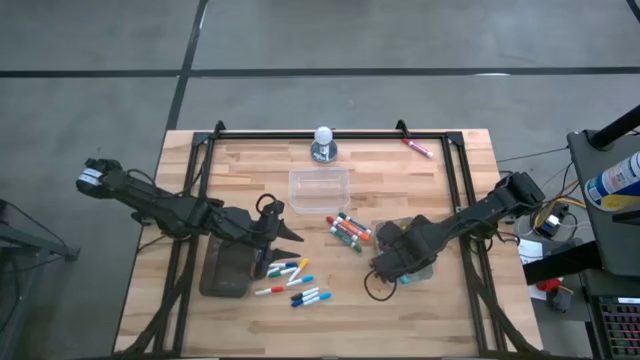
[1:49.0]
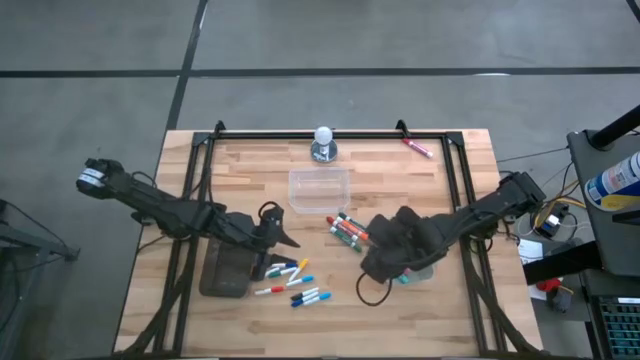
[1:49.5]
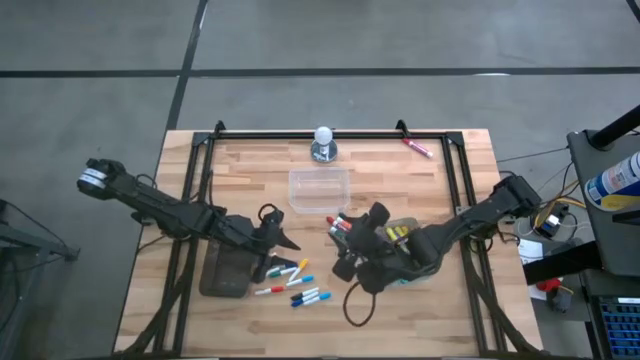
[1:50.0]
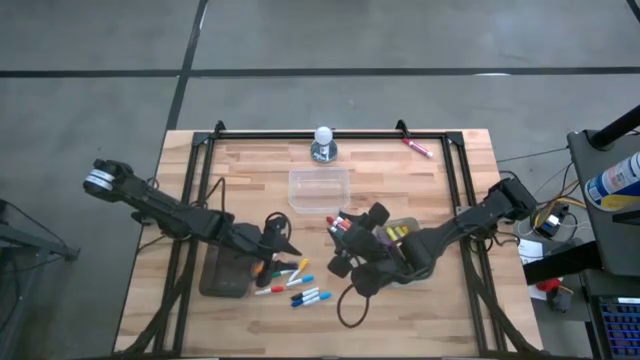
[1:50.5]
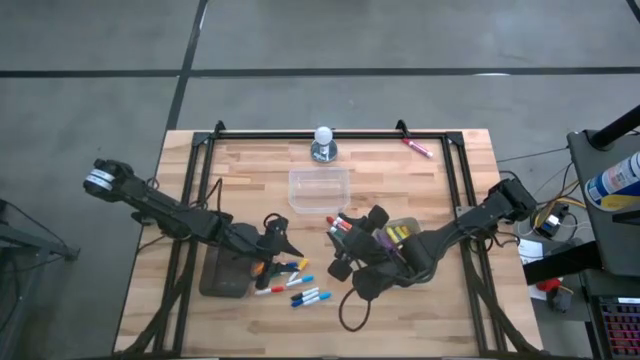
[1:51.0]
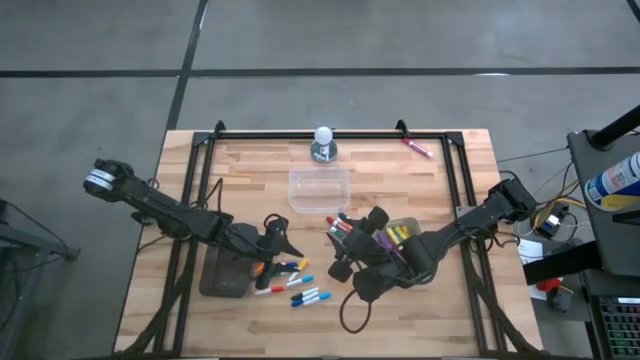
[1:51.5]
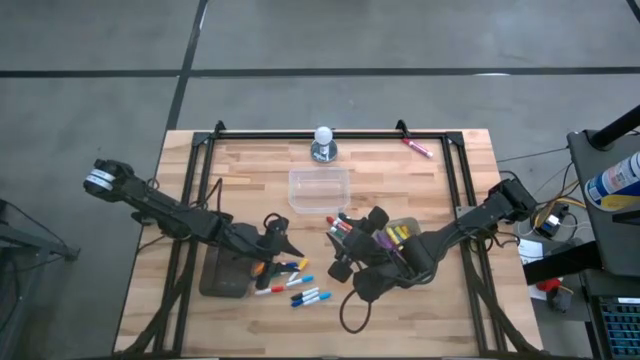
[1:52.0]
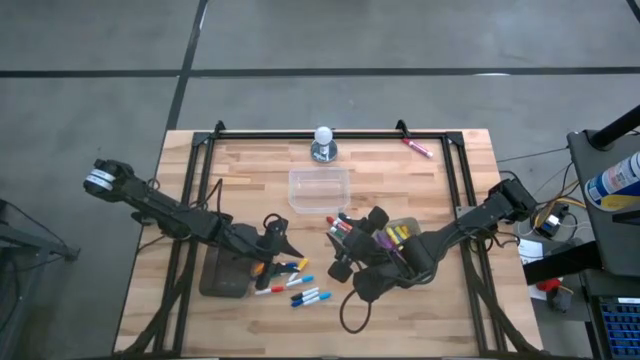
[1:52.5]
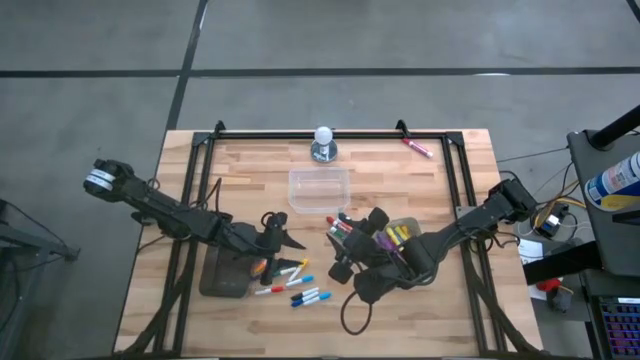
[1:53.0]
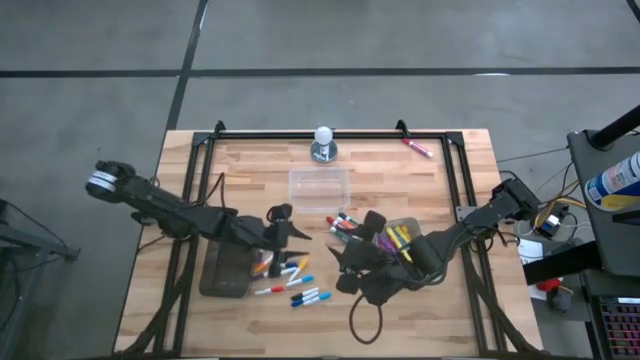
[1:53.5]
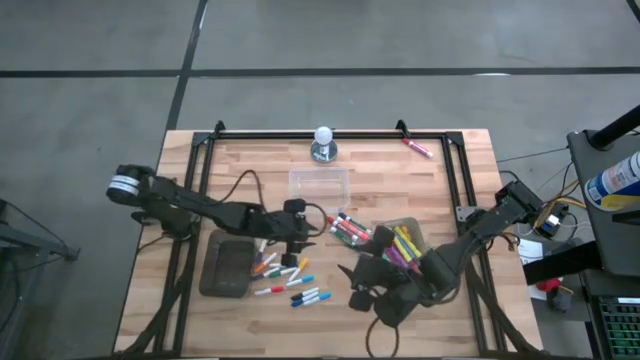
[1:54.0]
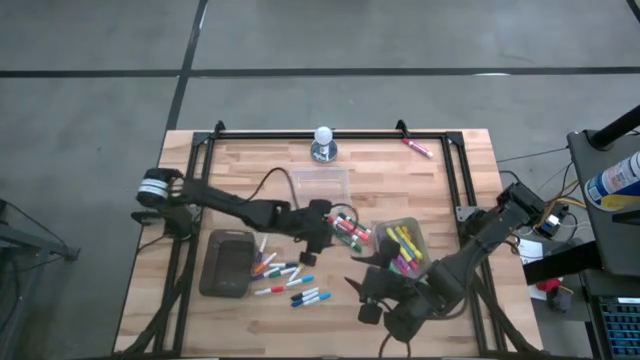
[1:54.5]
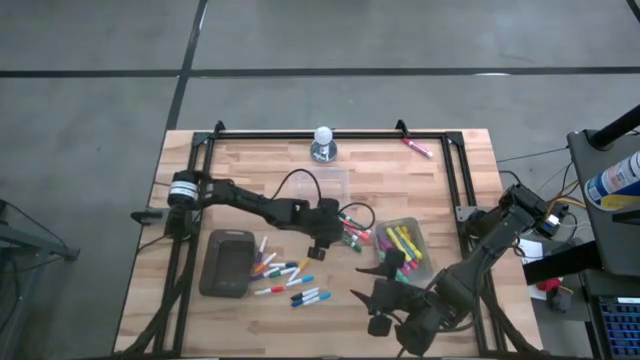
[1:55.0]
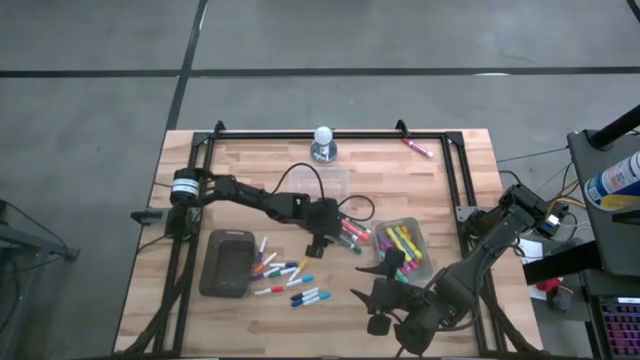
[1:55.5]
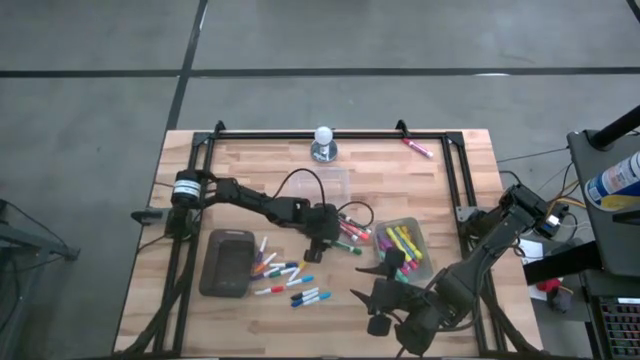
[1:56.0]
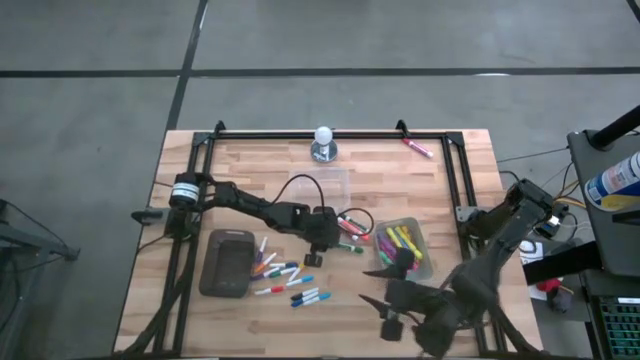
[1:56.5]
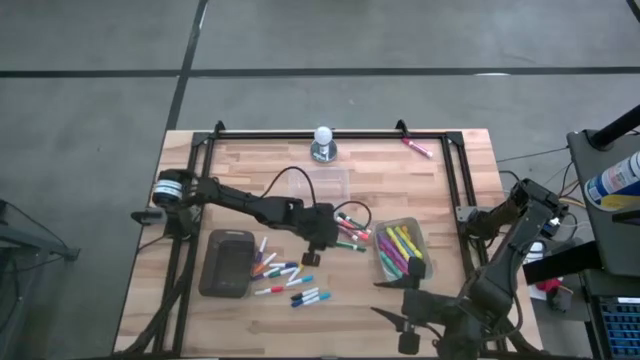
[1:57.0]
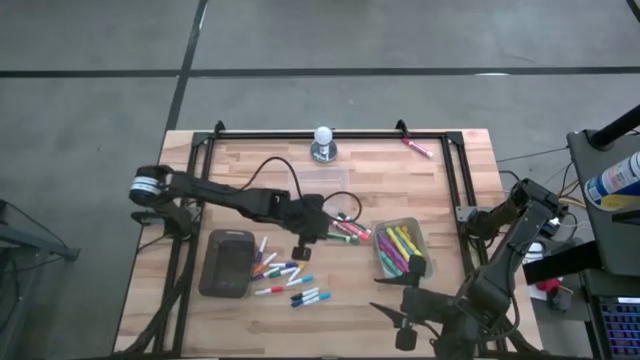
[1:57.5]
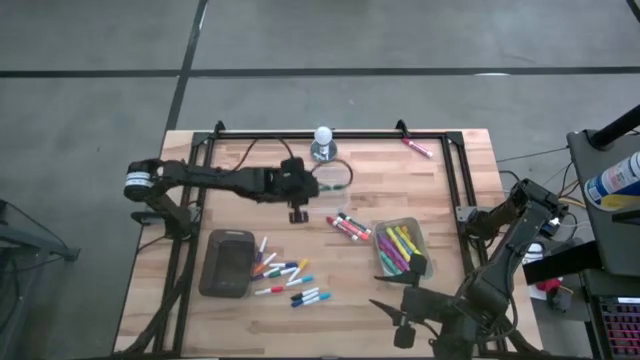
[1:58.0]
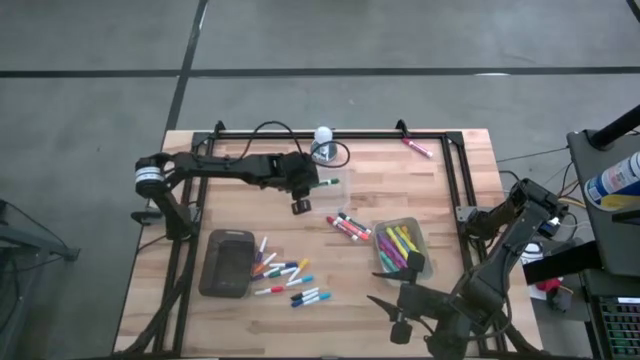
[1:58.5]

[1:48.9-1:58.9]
Task: Pick & Place Markers
Put the light green dry erase marker into the transparent bin

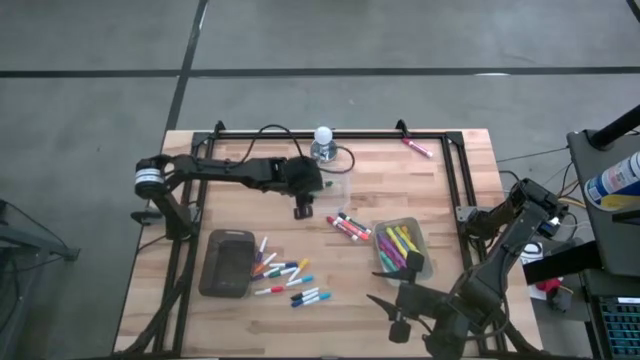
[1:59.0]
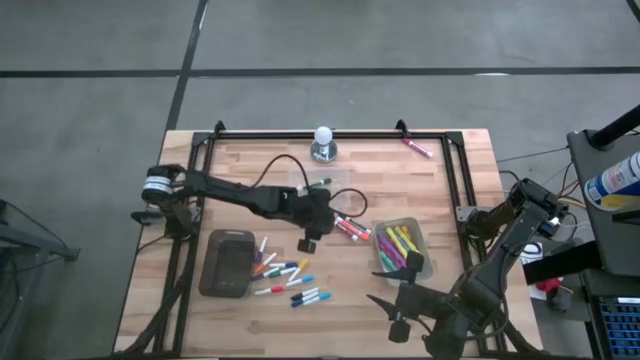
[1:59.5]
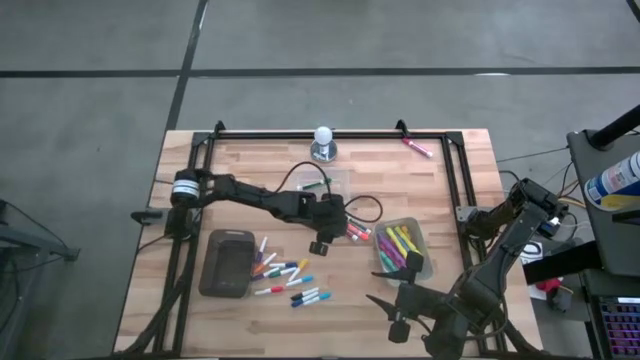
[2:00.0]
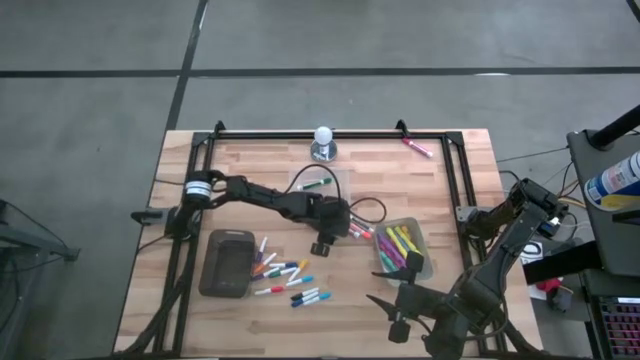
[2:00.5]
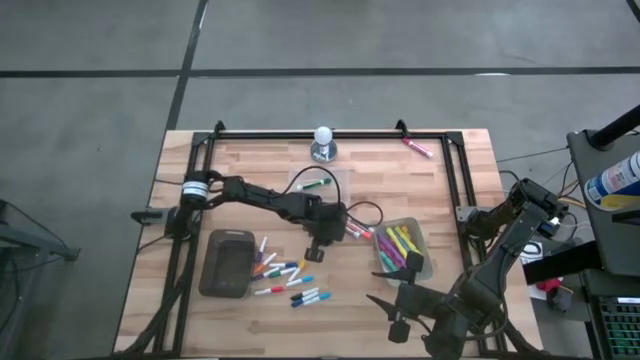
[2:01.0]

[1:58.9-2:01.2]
Put the red dry erase marker into the transparent bin

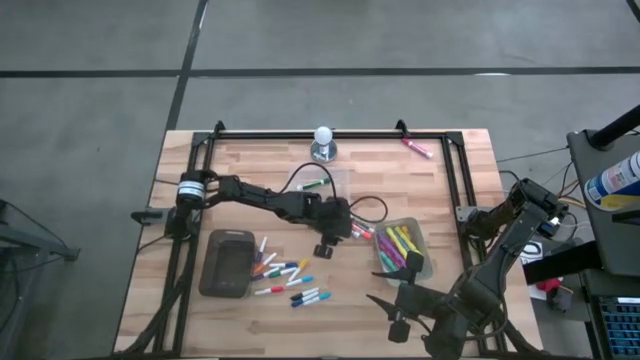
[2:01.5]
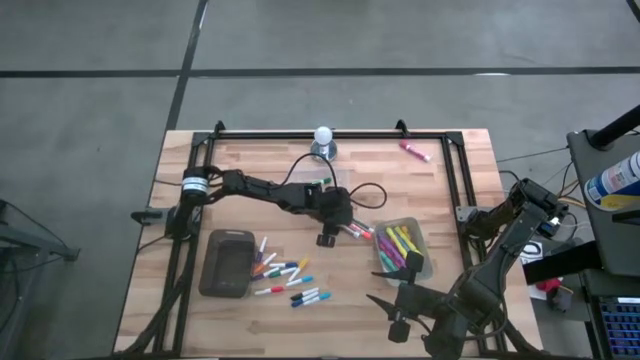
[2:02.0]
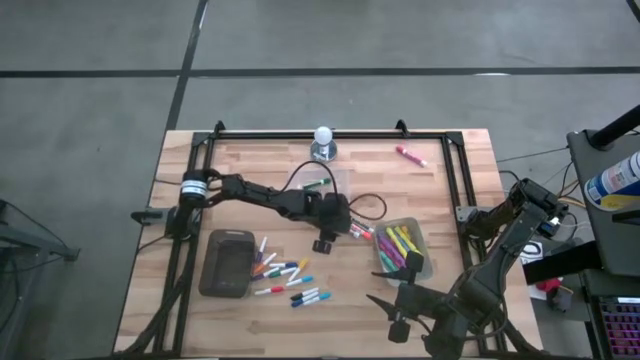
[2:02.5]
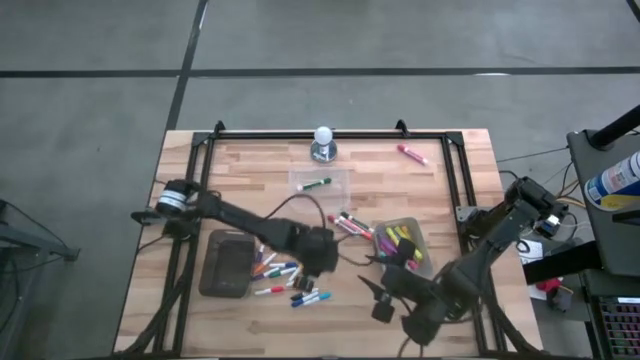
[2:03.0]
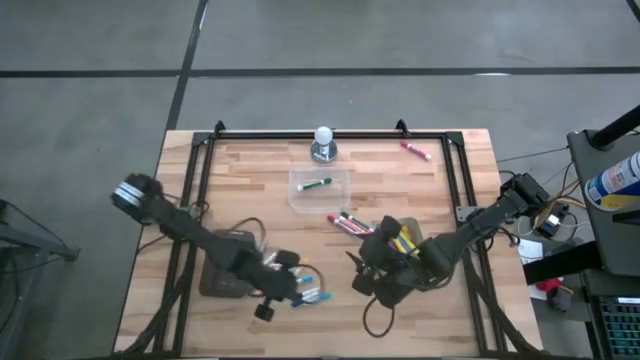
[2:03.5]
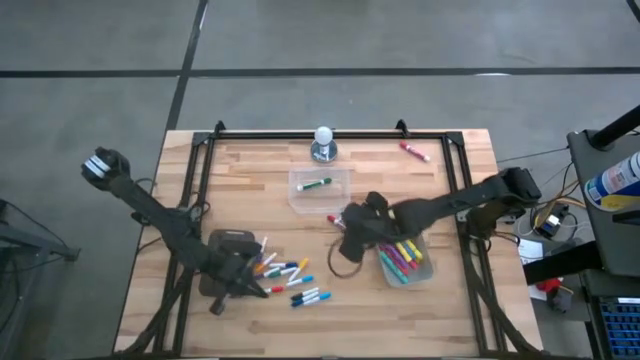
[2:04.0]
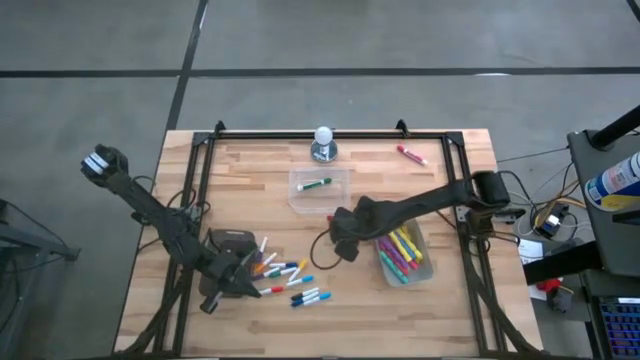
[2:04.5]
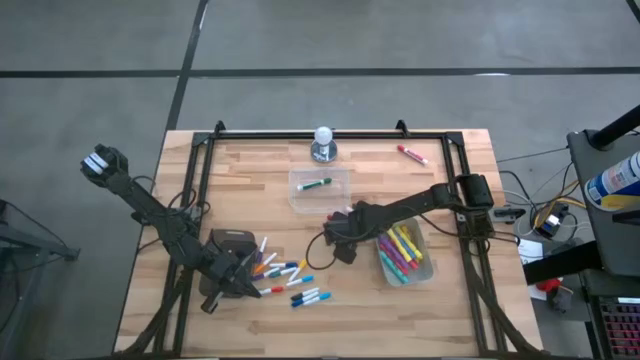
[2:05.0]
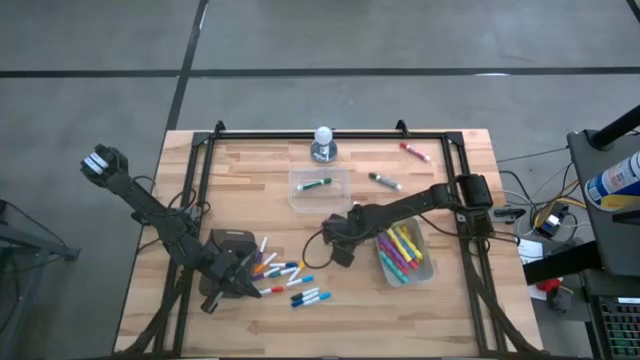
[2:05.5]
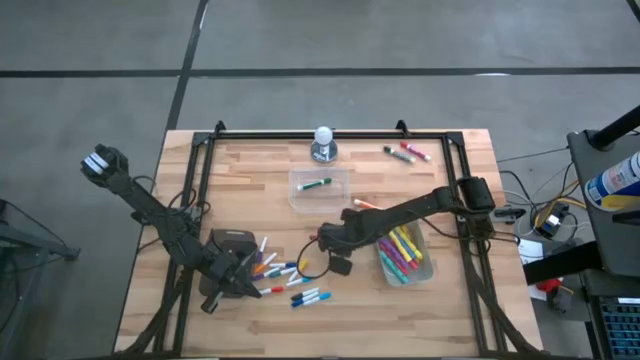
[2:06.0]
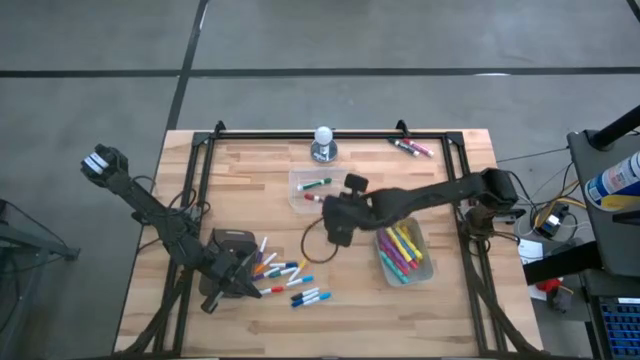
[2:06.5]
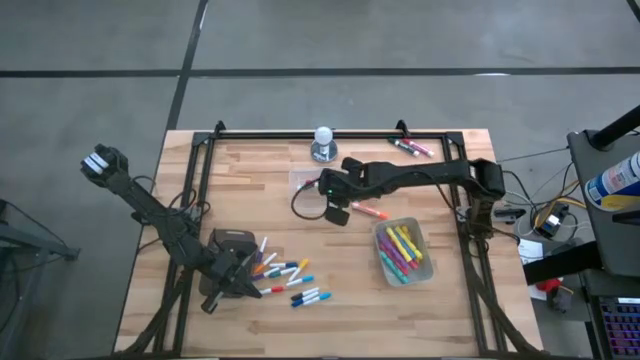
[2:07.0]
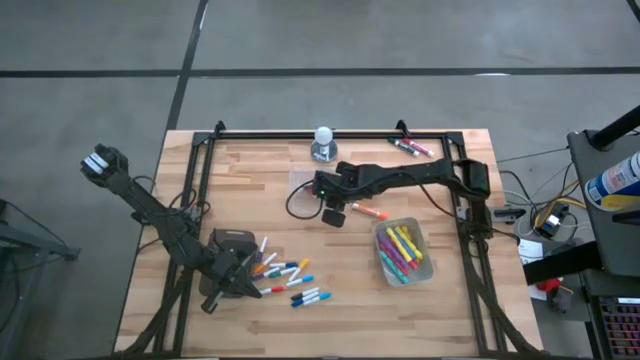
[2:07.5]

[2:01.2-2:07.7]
Put the red dry erase marker into the transparent bin

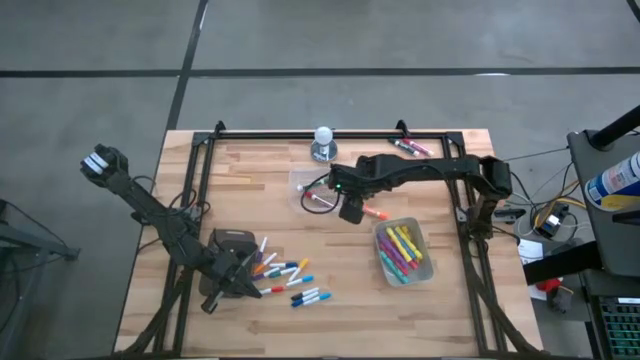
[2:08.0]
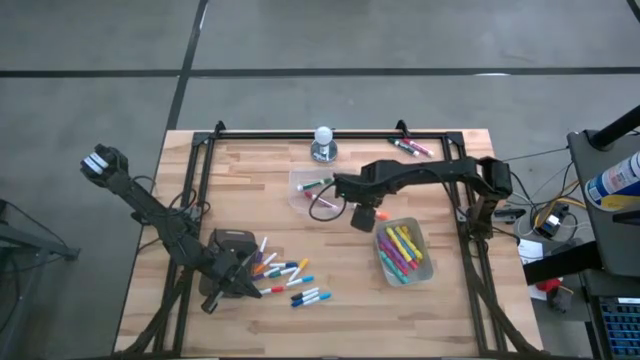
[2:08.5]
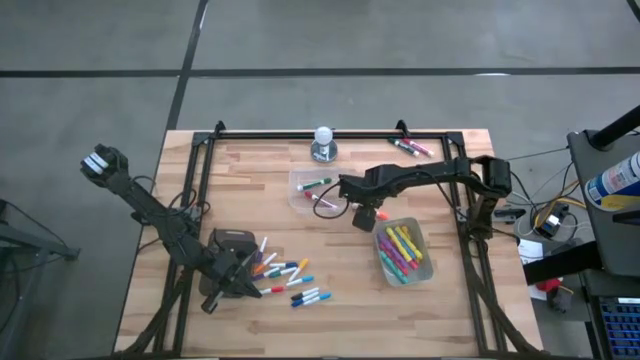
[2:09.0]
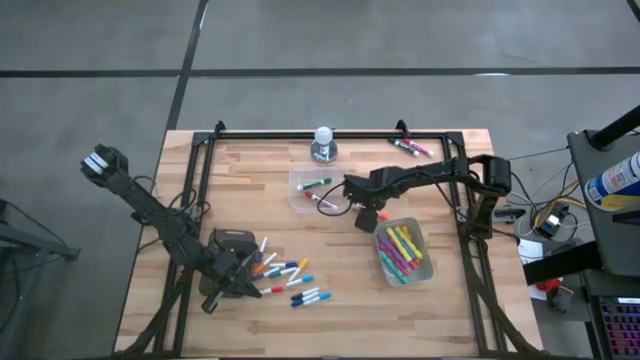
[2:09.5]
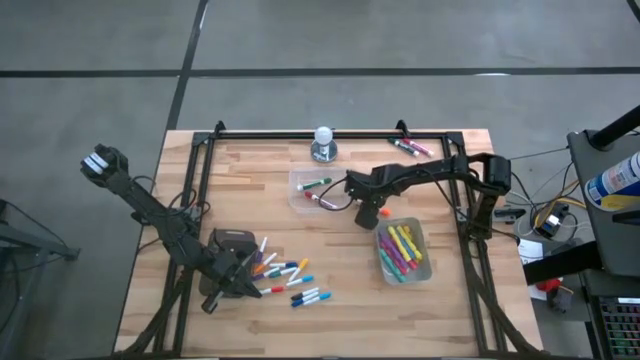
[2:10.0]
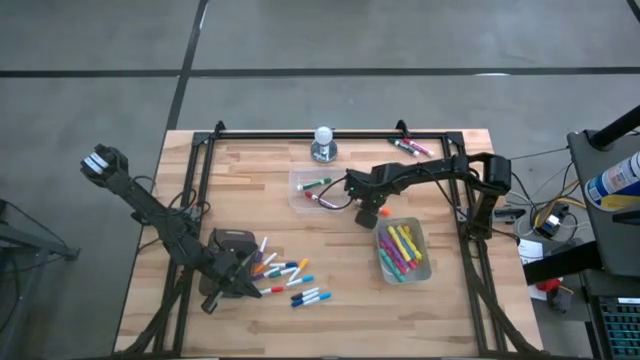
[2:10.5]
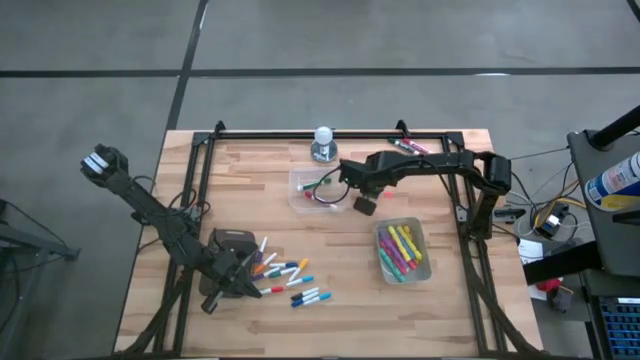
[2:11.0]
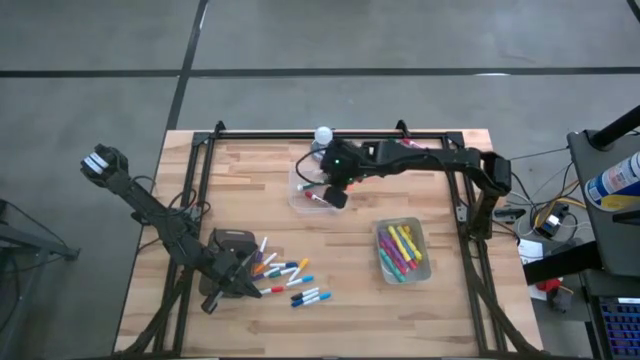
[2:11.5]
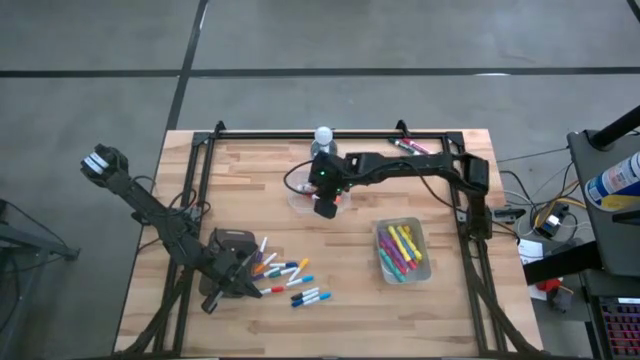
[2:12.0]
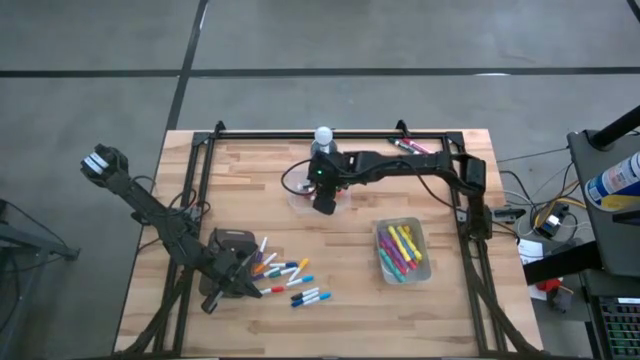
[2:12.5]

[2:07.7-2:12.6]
Put the orange dry erase marker into the transparent bin
